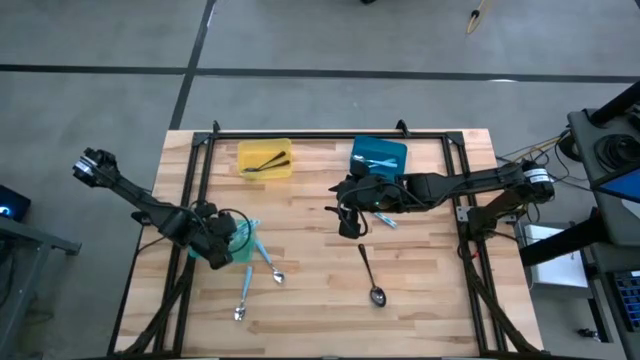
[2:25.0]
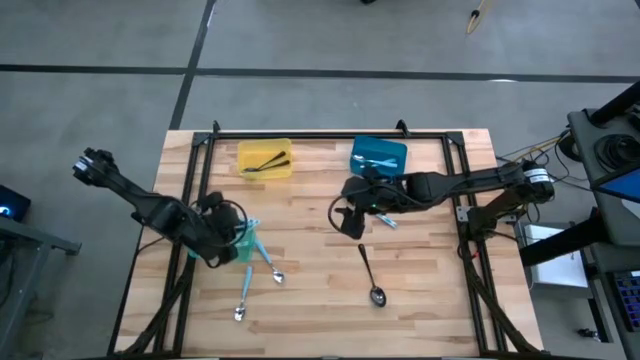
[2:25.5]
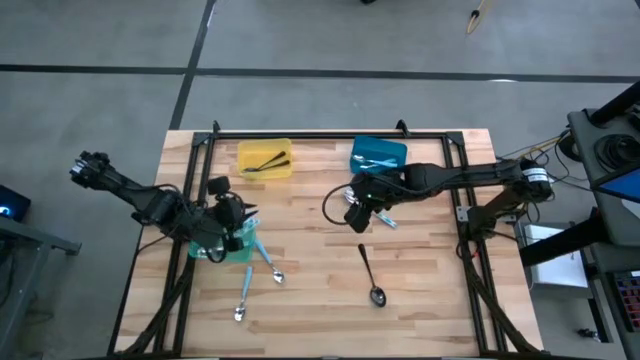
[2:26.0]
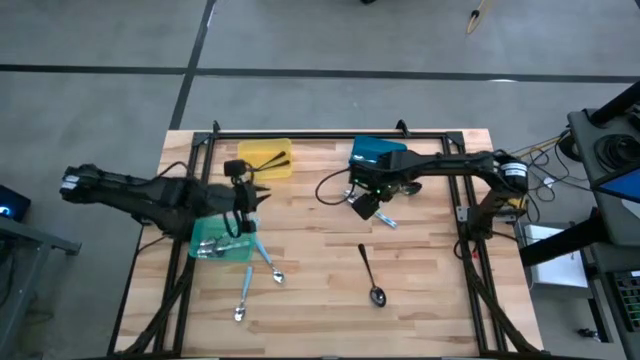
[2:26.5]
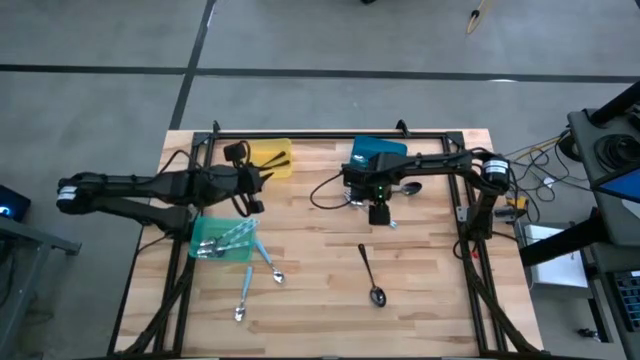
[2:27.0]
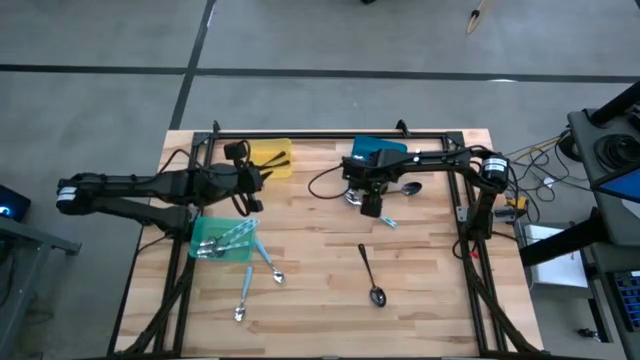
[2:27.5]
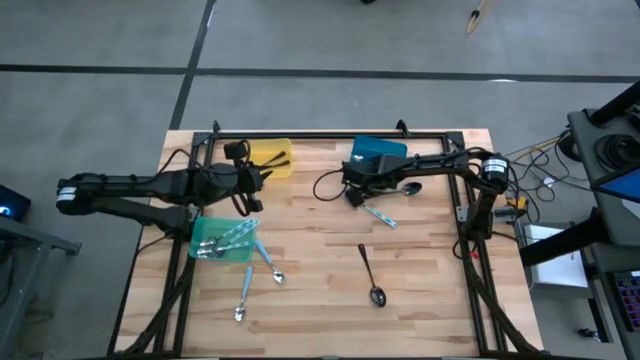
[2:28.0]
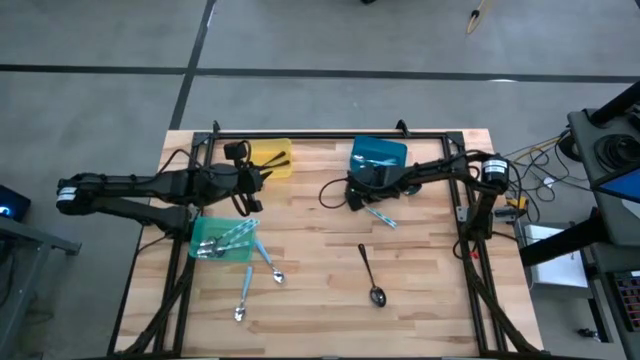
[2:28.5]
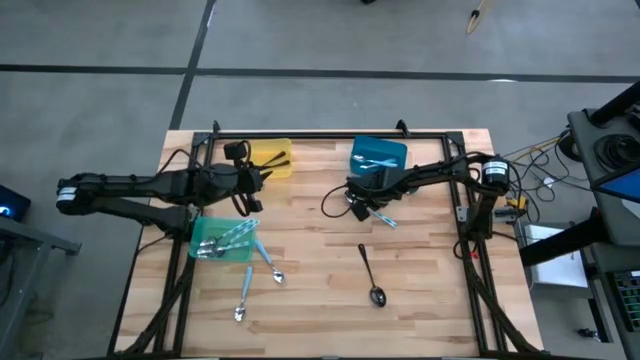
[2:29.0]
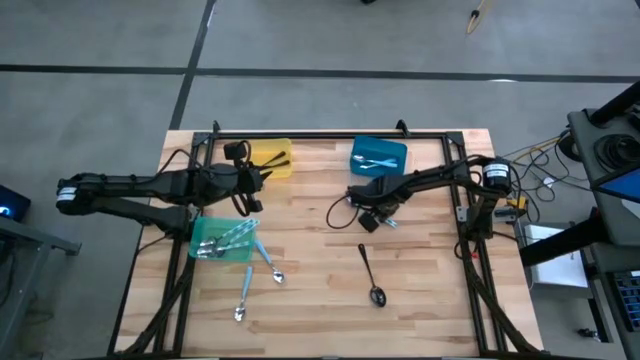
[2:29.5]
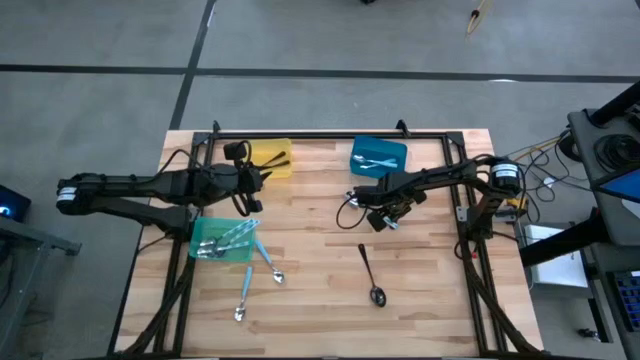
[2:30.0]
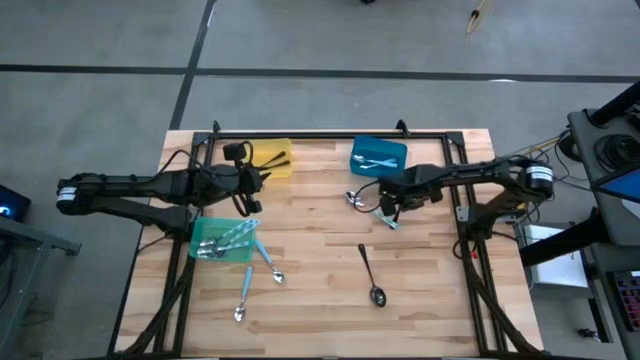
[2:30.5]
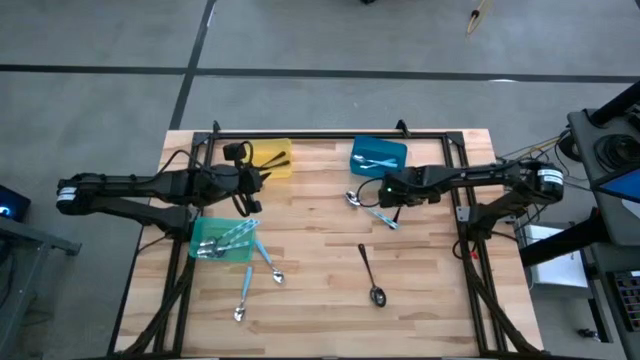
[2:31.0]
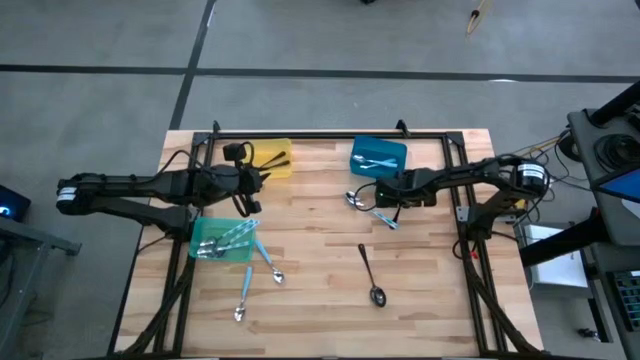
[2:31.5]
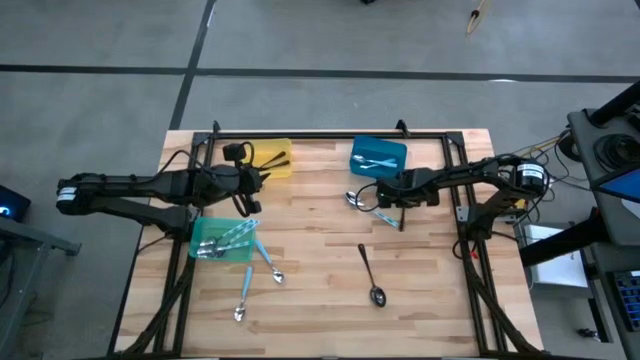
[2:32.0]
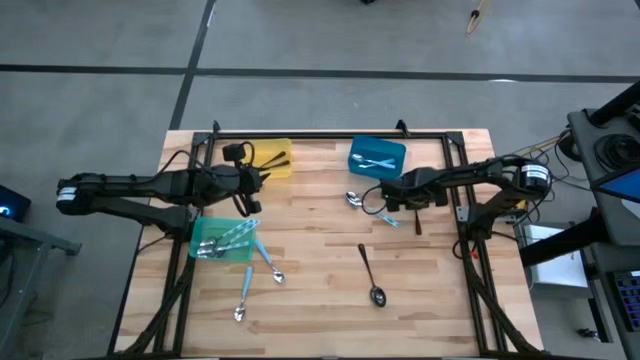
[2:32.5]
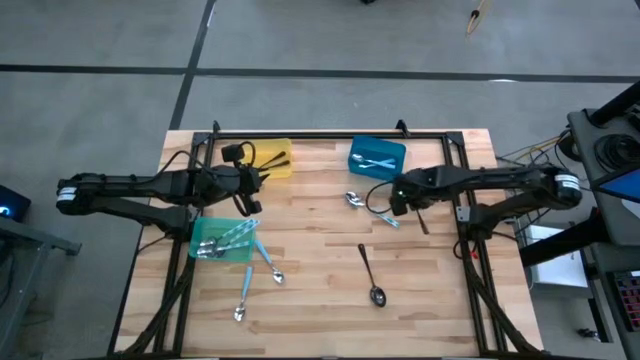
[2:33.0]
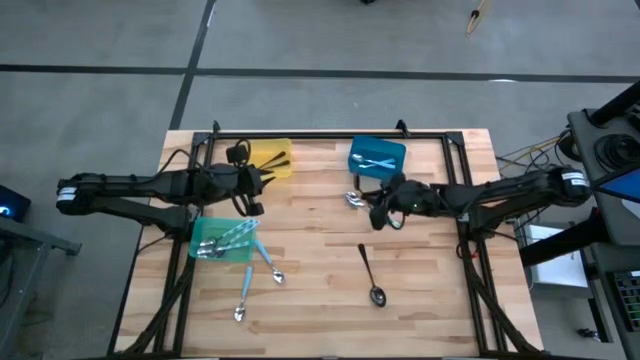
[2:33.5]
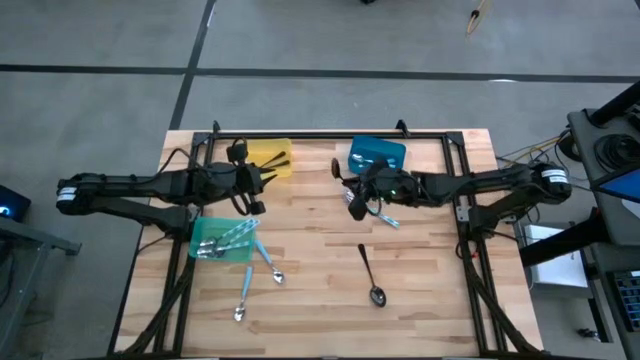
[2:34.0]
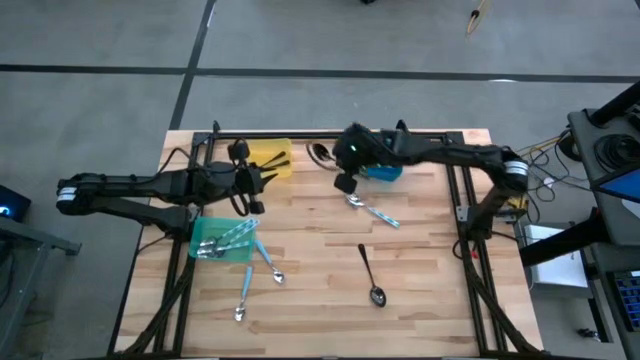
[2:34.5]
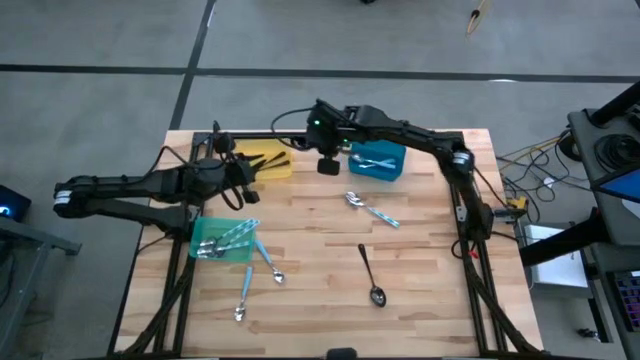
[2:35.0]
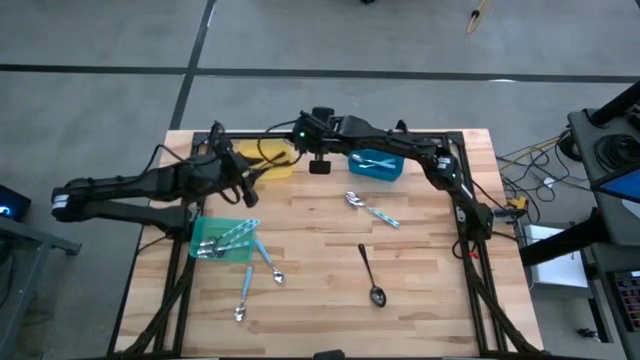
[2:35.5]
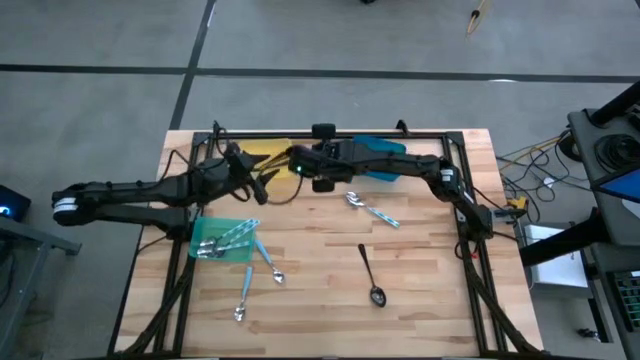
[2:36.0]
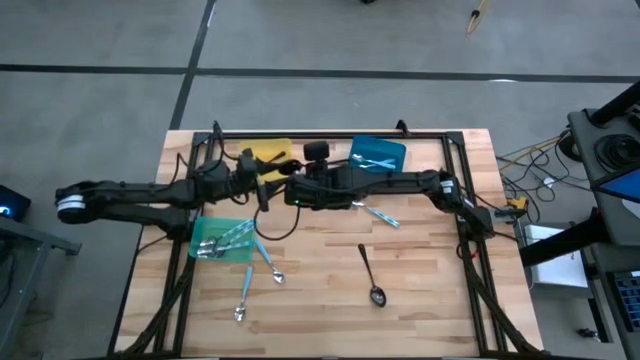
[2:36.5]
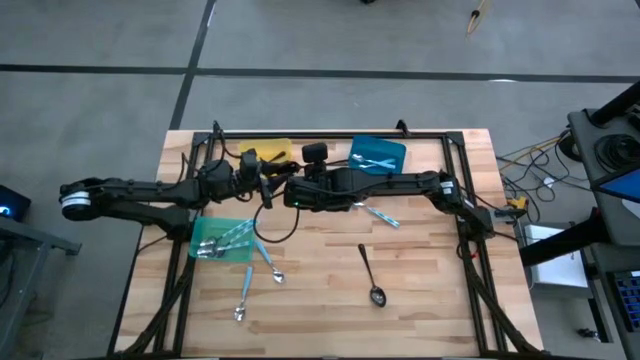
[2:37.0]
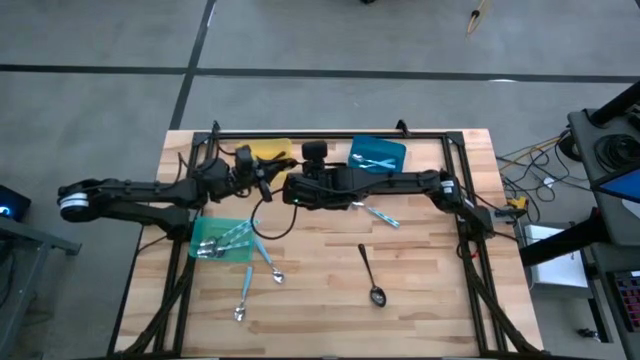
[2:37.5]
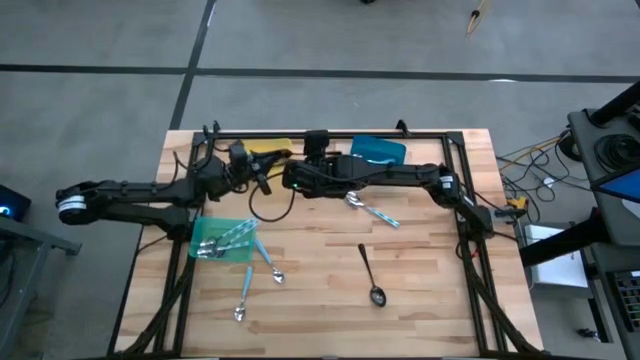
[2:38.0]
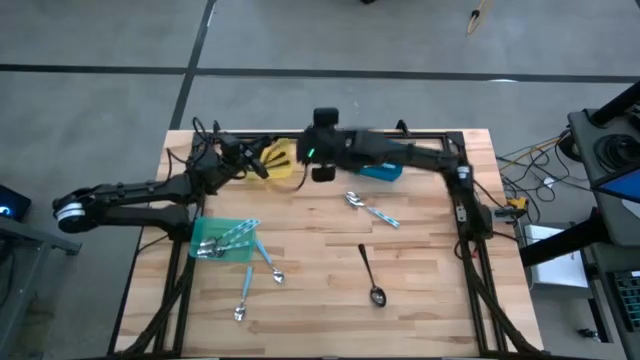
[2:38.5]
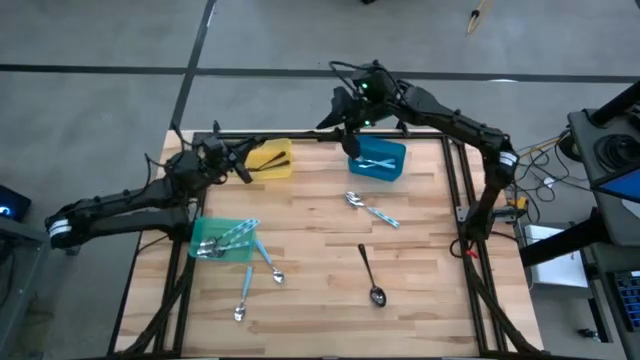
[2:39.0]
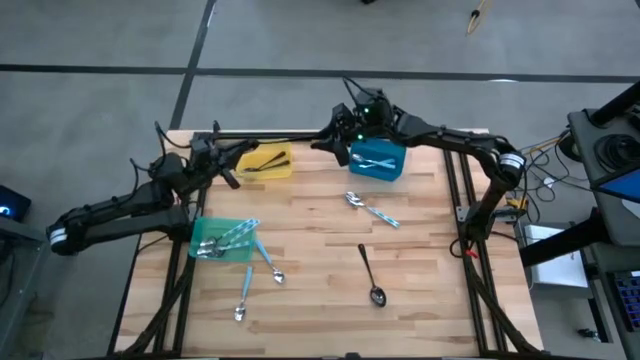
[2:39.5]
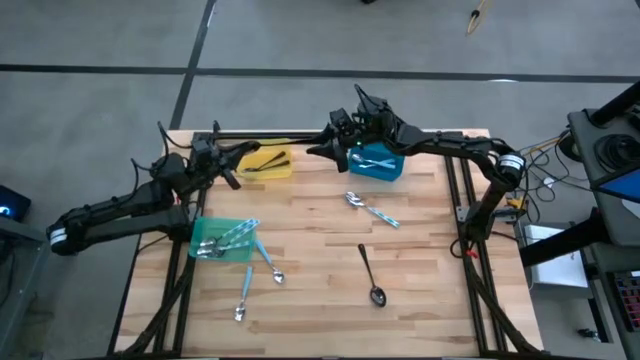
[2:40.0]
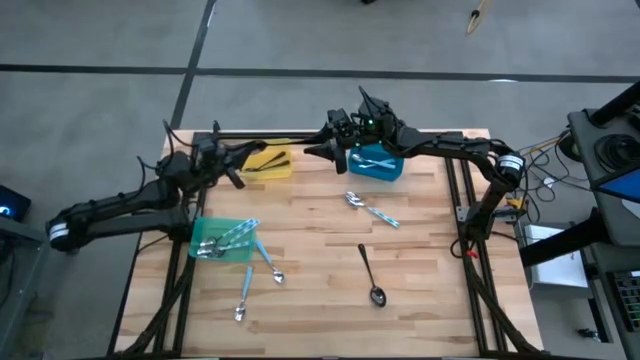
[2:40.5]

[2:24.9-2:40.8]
Task: Sort silverware by color (type)
Put the black spoon into the yellow bin

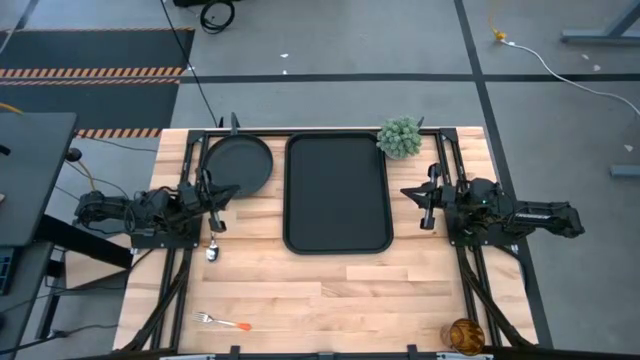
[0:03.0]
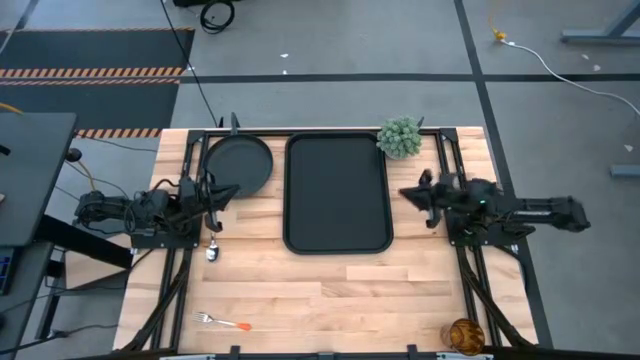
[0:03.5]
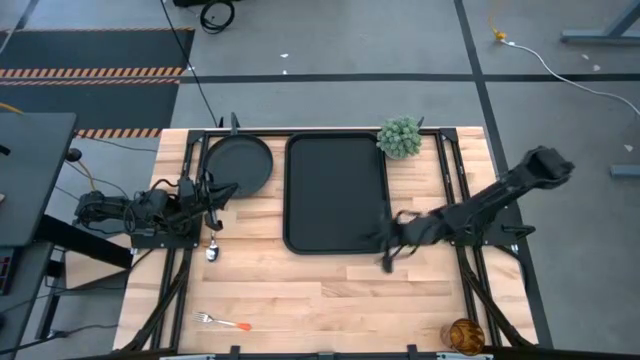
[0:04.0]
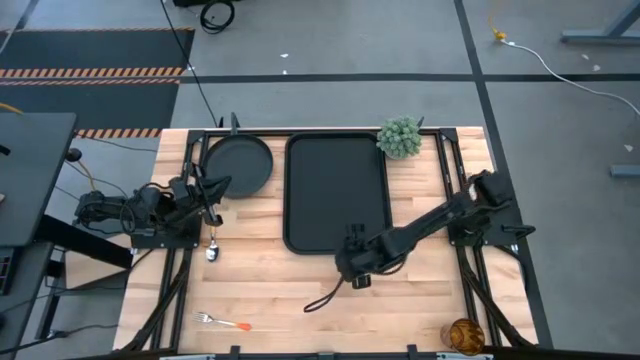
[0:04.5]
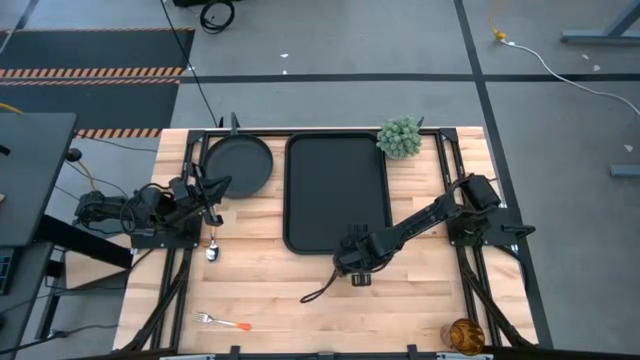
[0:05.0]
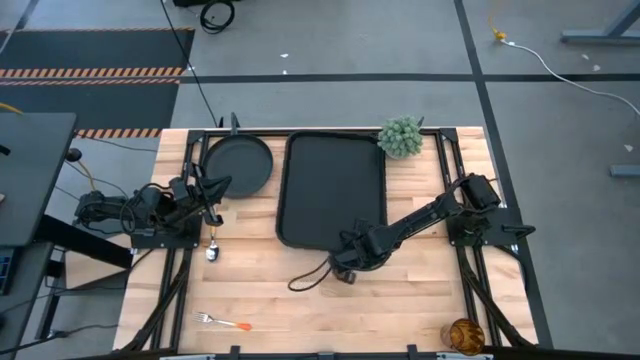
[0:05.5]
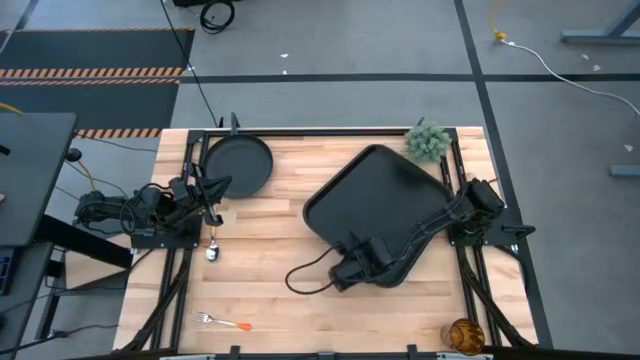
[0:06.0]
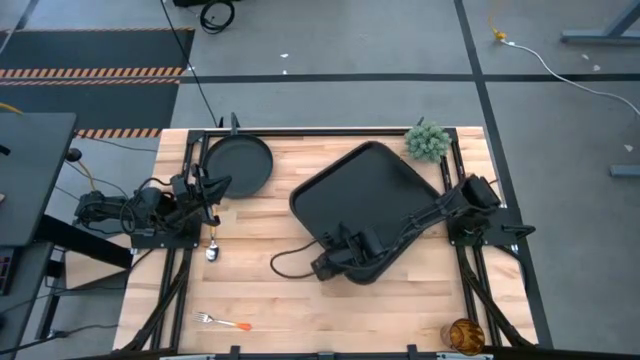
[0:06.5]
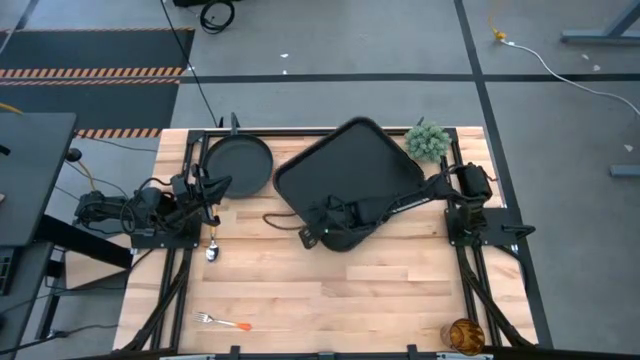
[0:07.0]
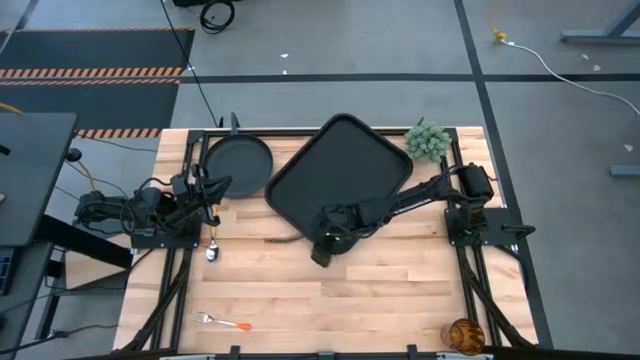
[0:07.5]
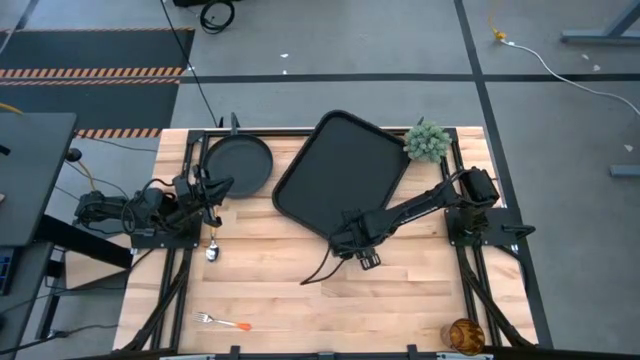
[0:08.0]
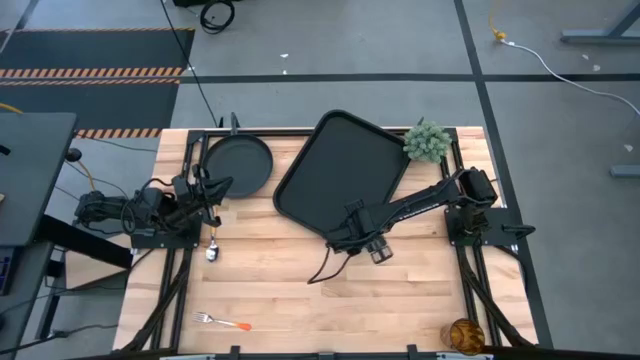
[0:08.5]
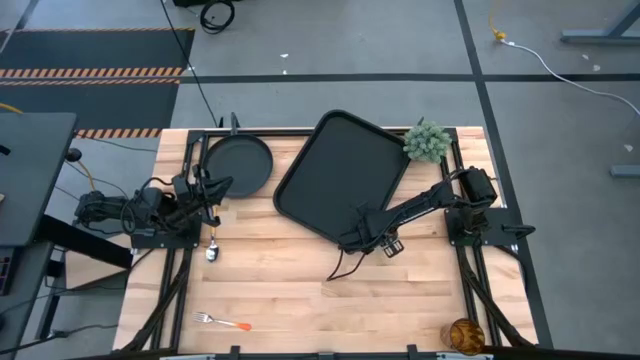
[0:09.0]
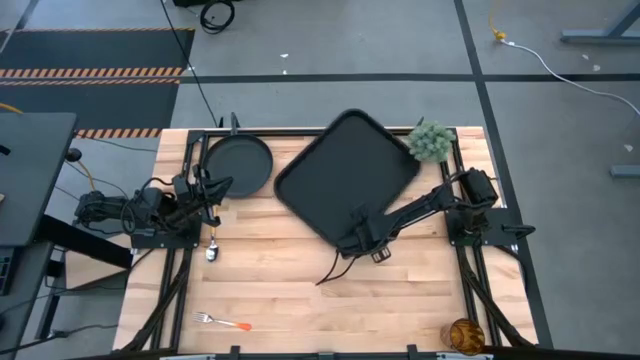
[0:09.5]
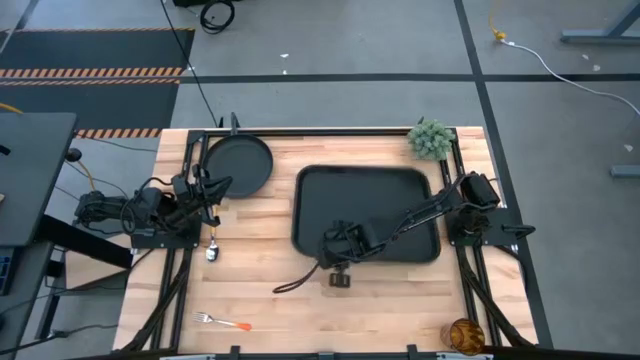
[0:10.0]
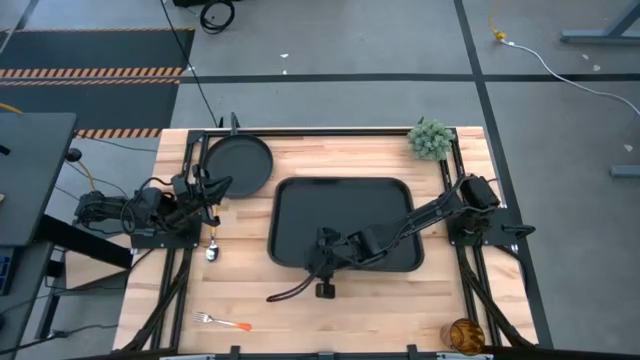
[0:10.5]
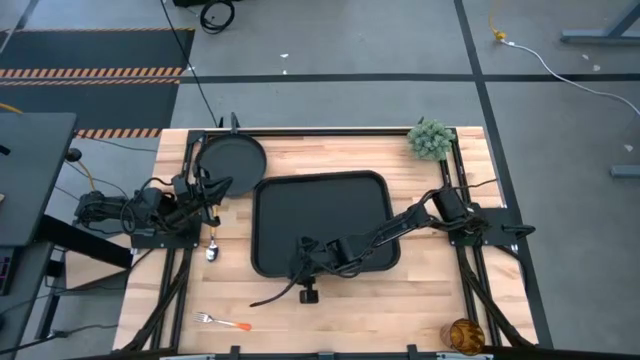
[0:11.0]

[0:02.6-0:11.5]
Task: Pick and place plate/cup/fork/spoon on tray
Move the black serving tray to the center of the table
